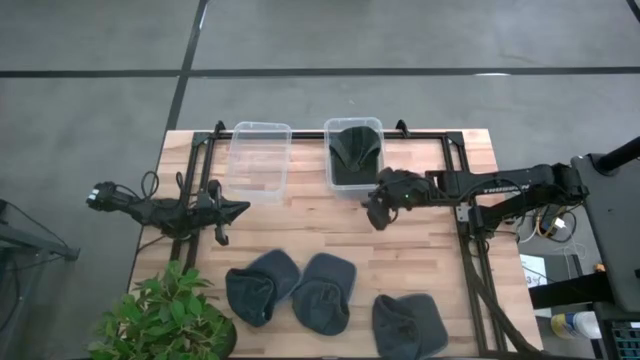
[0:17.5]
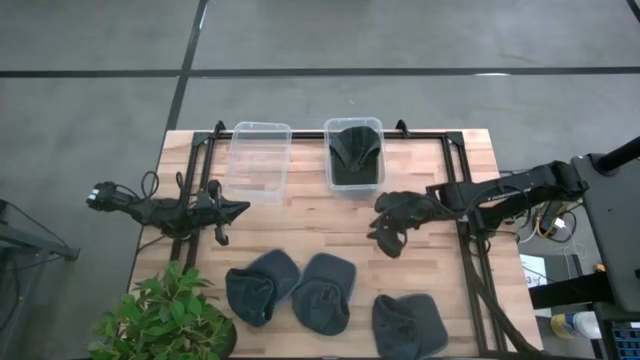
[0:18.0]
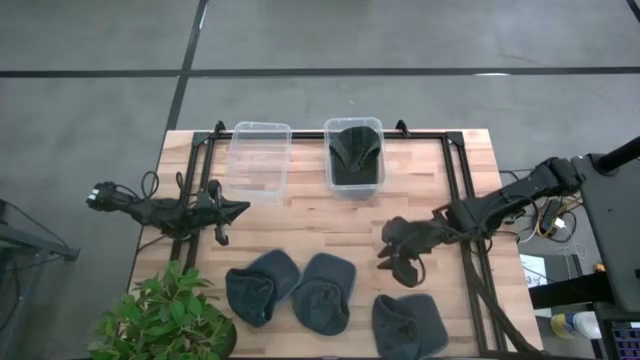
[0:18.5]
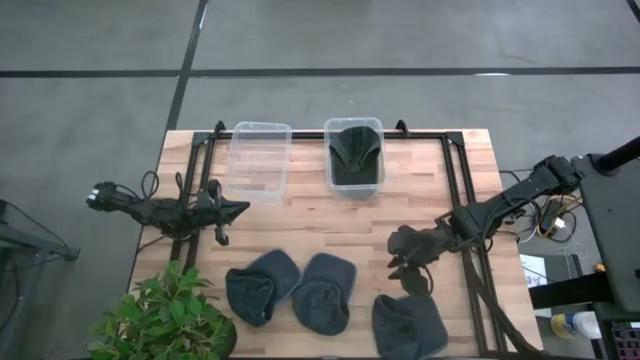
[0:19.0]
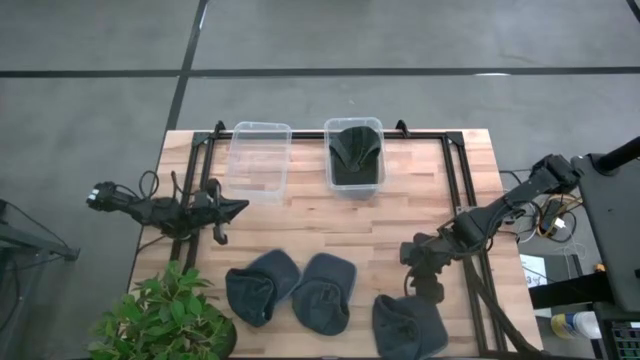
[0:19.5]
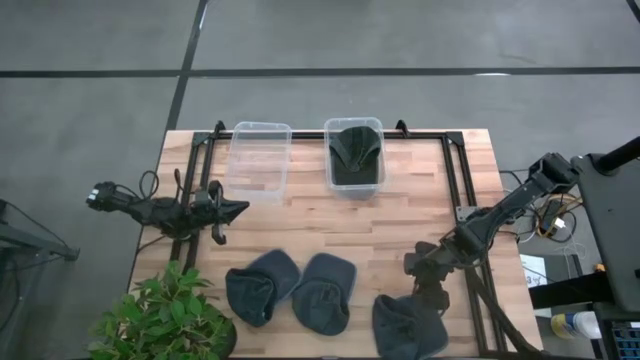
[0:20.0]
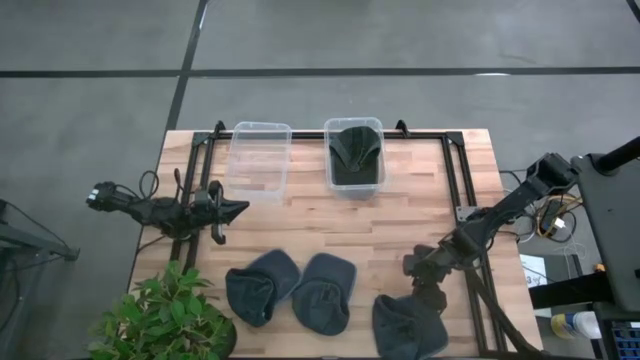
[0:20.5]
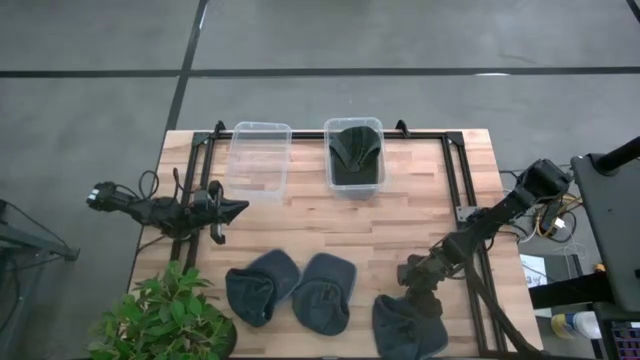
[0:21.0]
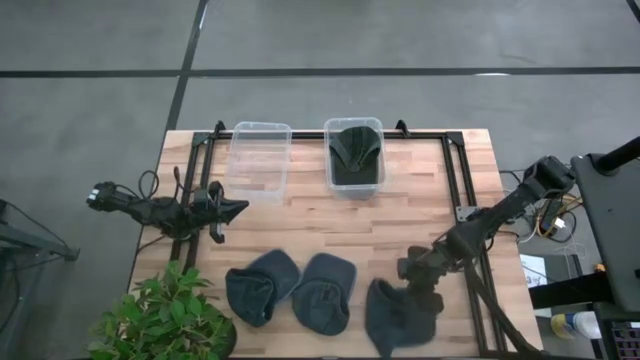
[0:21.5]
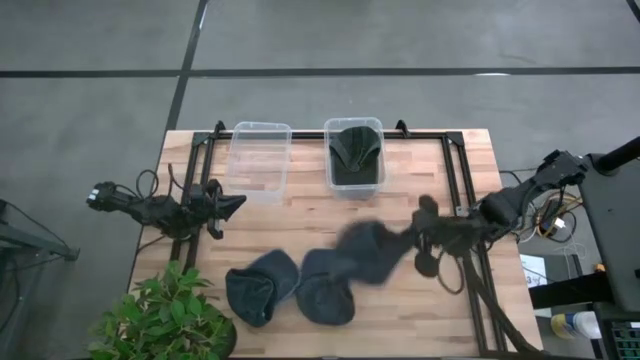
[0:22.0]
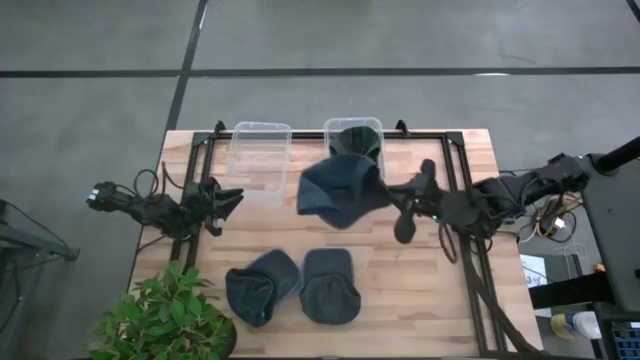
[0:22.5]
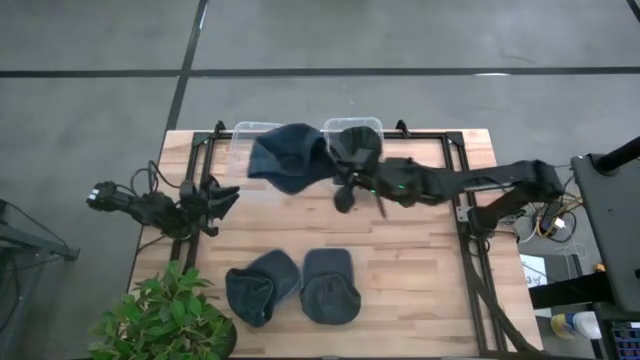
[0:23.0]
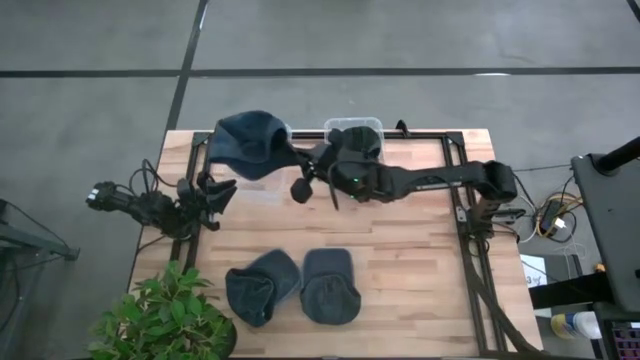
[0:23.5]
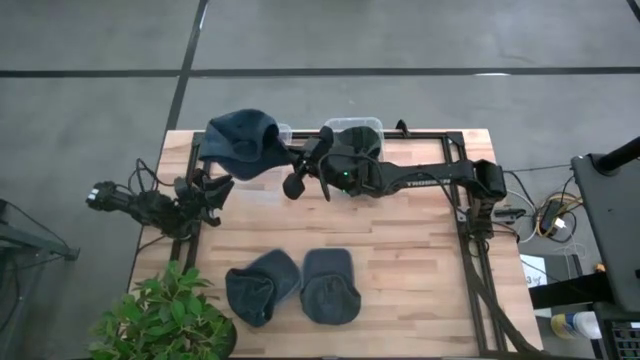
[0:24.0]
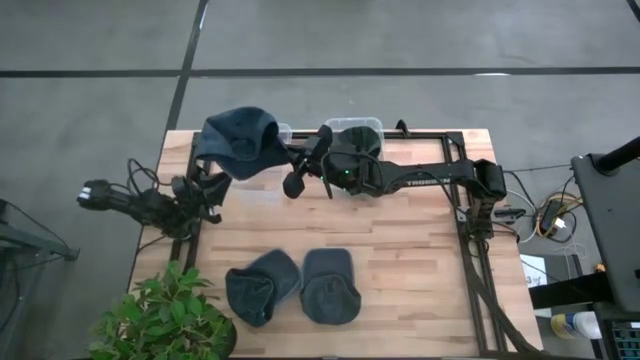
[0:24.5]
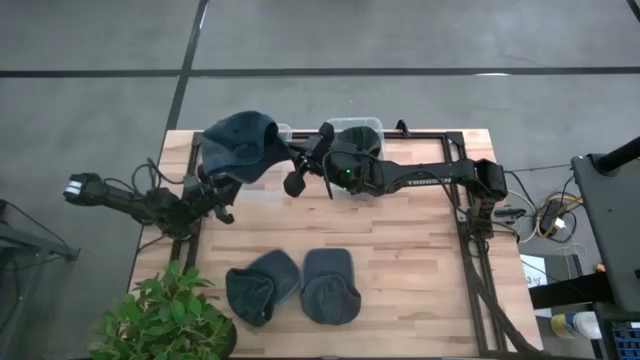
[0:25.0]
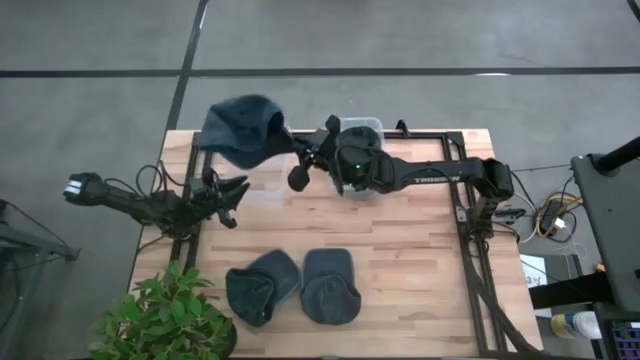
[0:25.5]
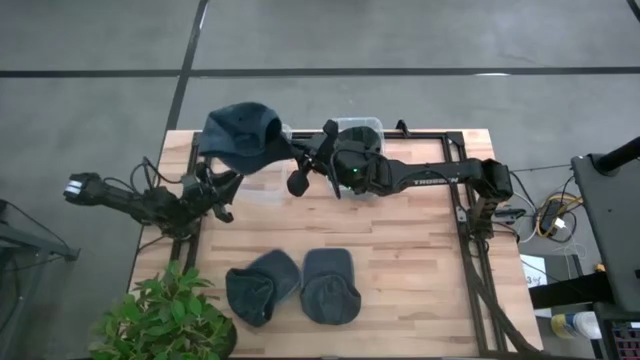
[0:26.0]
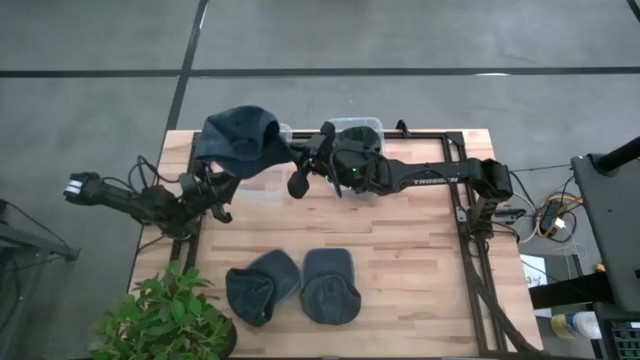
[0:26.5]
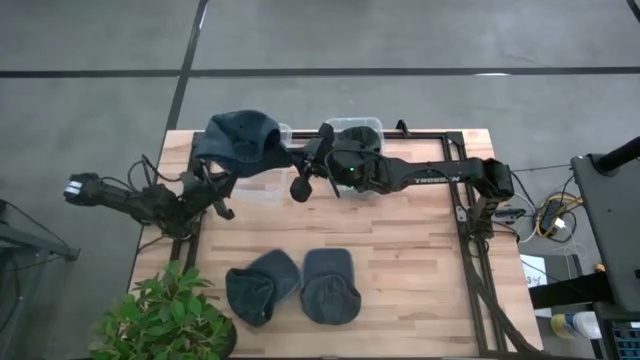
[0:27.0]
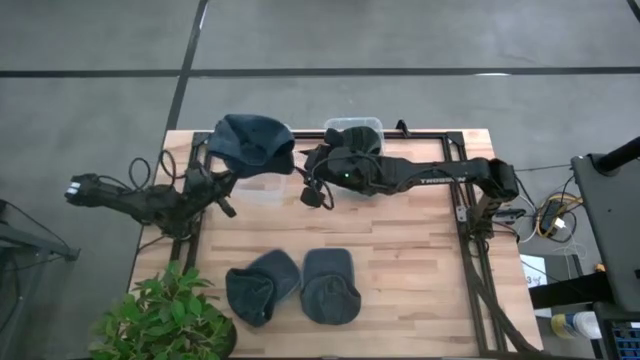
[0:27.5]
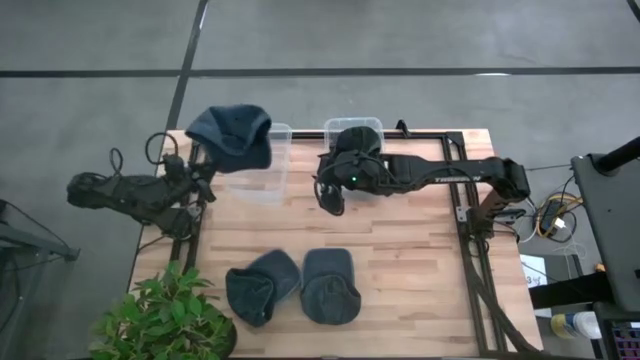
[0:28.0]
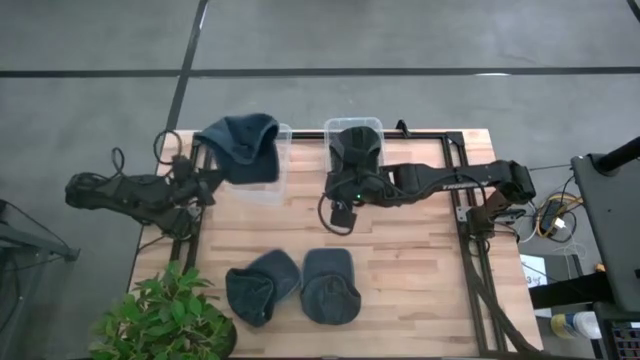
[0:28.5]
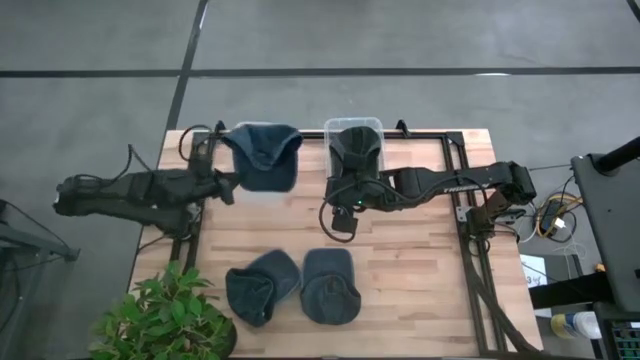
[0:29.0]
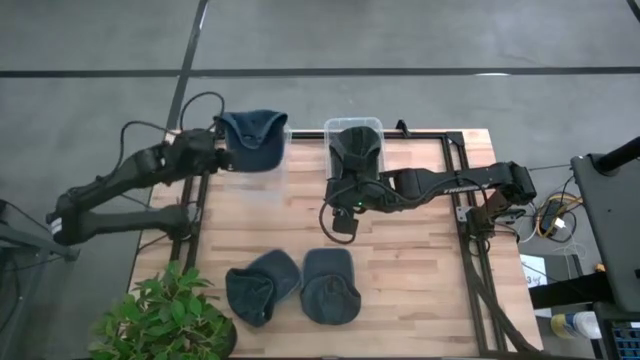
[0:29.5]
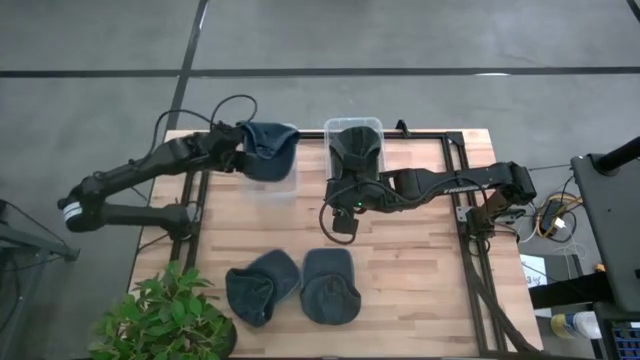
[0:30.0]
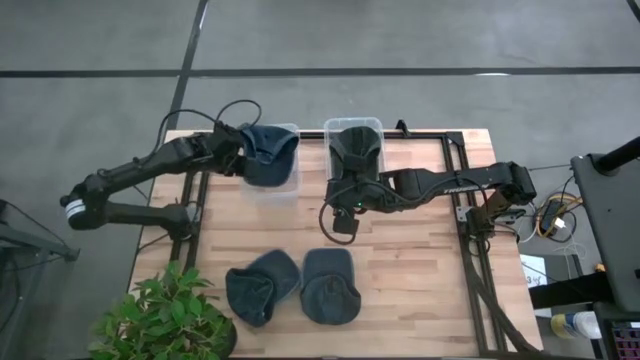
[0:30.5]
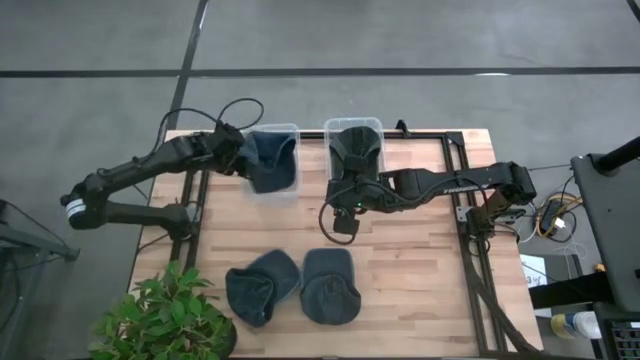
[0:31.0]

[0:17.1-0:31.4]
Task: Pick & Place hat
Put the right blue cap into the left transparent bin

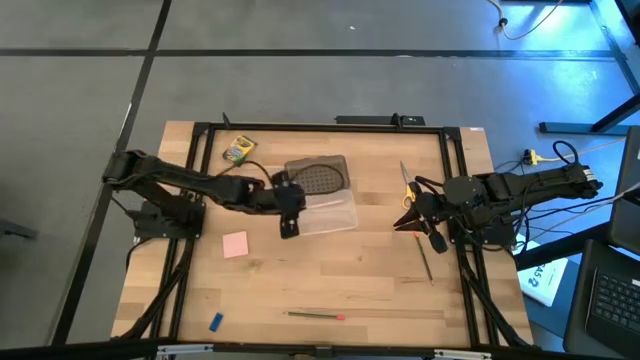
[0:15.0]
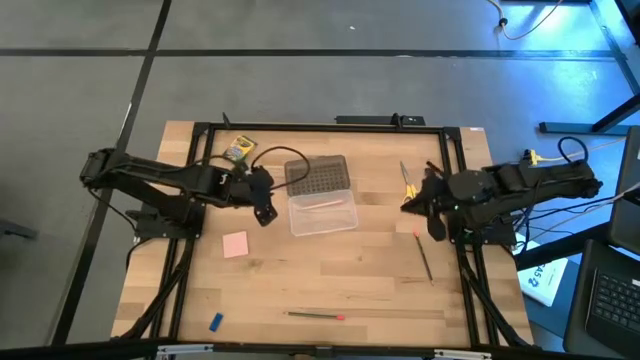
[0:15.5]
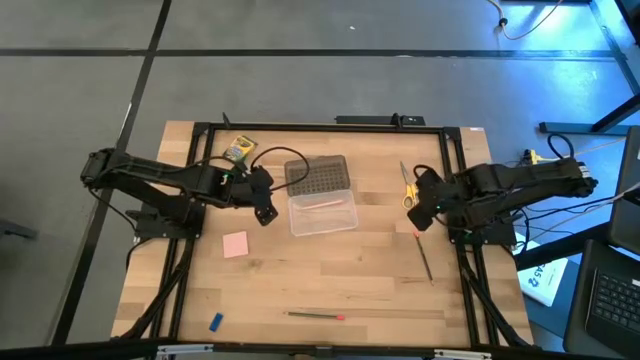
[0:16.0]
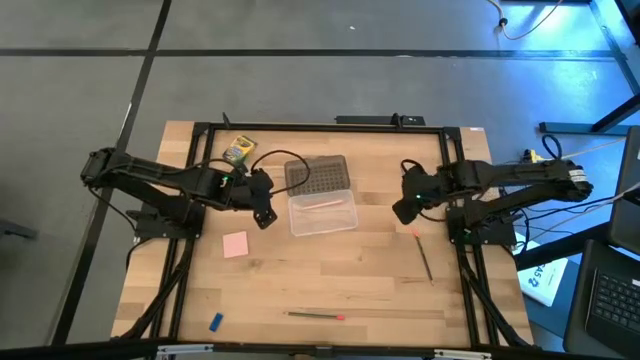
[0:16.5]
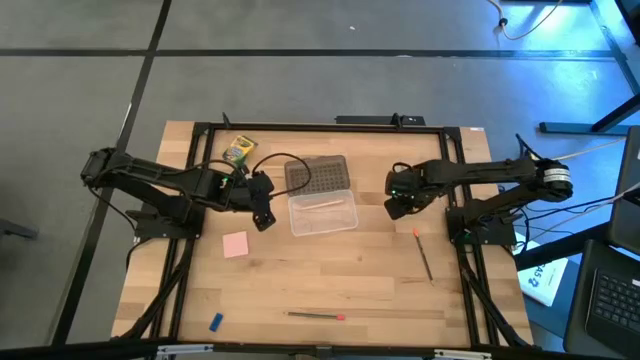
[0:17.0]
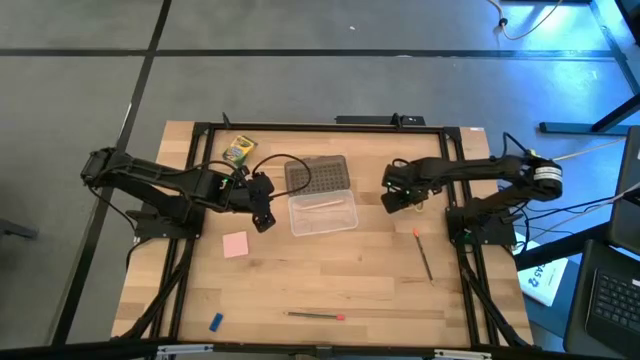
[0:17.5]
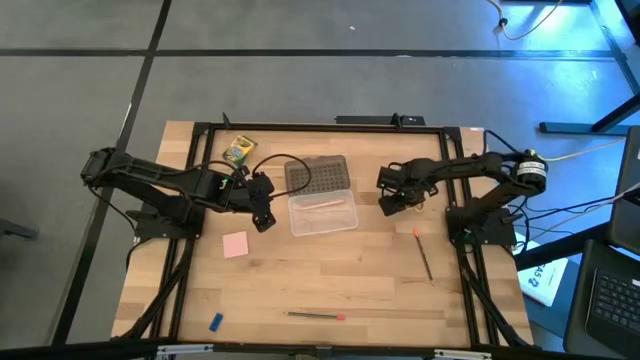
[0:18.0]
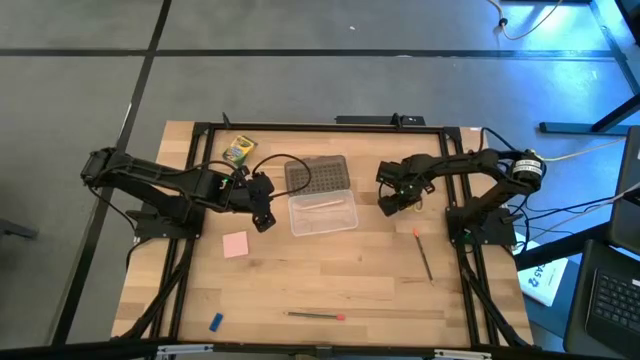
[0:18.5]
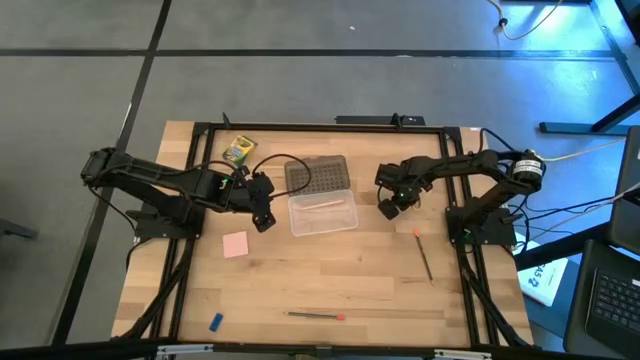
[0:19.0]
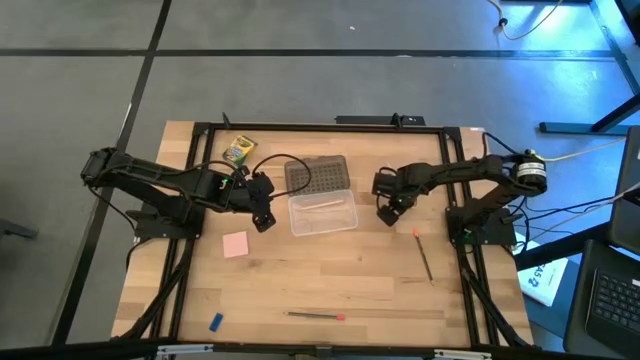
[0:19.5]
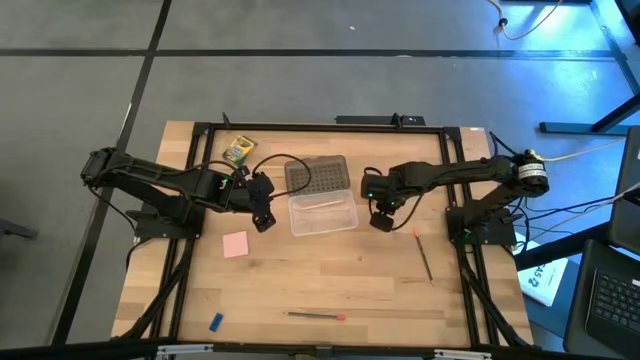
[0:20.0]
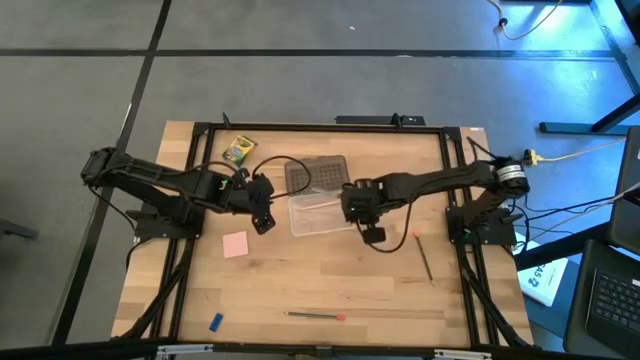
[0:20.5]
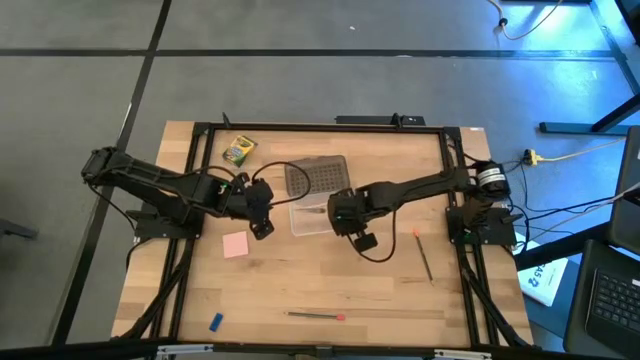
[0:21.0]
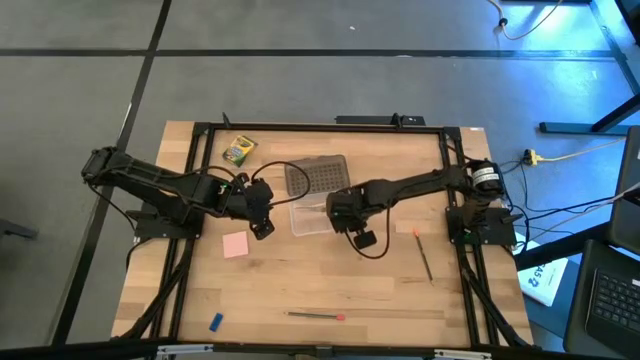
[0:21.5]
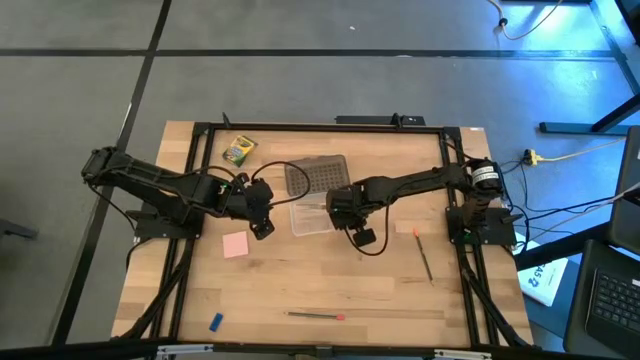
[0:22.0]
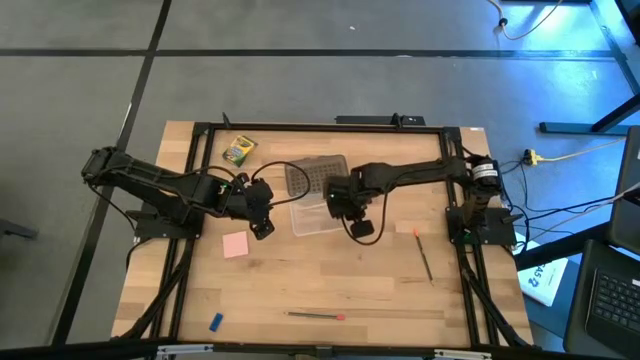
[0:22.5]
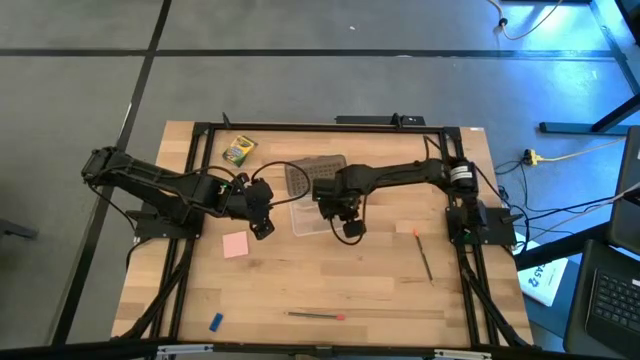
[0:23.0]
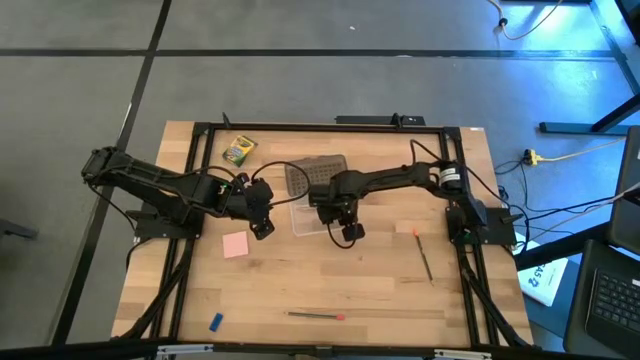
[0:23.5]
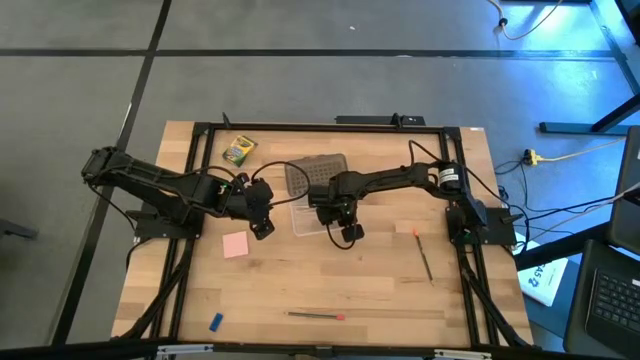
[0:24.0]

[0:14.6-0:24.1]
Task: Pack school essentials
Put the yellow scissors into the black supply box
